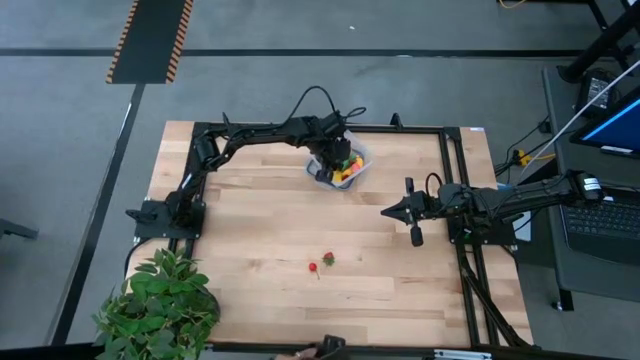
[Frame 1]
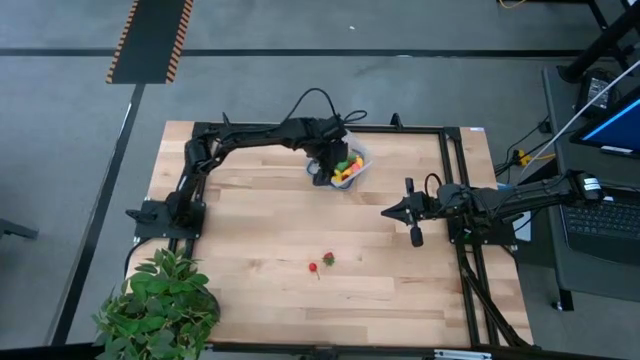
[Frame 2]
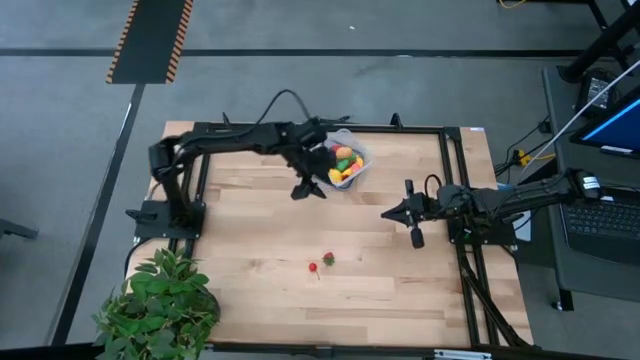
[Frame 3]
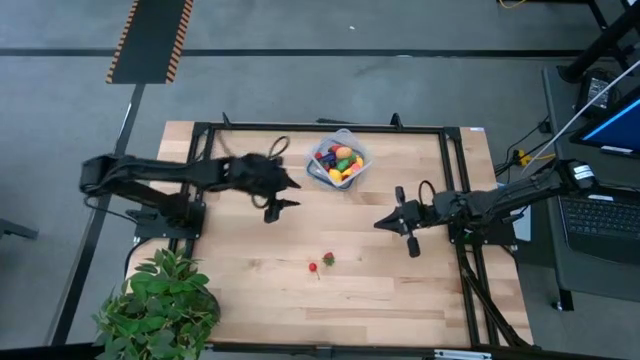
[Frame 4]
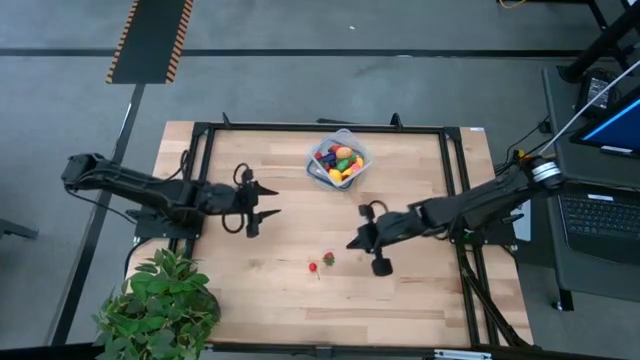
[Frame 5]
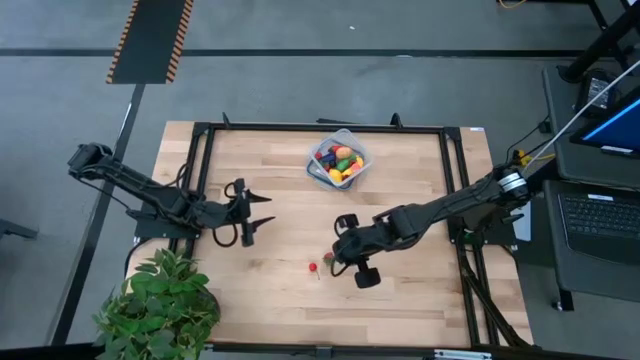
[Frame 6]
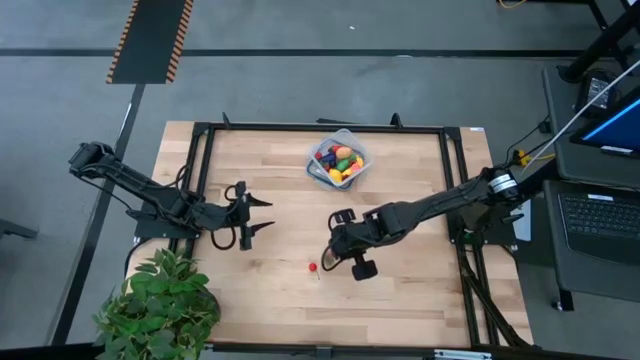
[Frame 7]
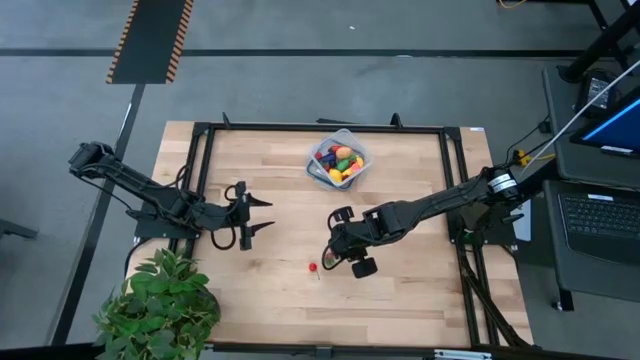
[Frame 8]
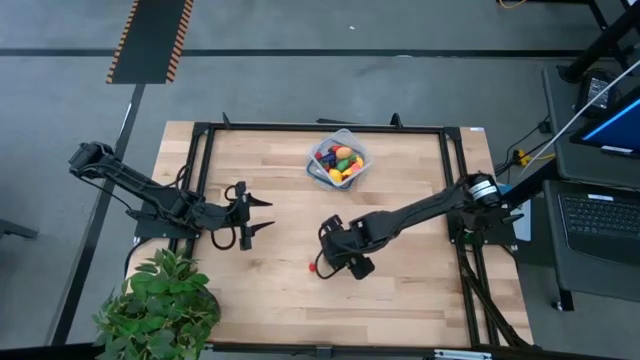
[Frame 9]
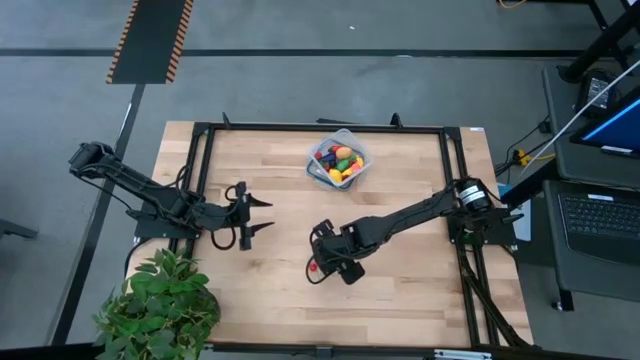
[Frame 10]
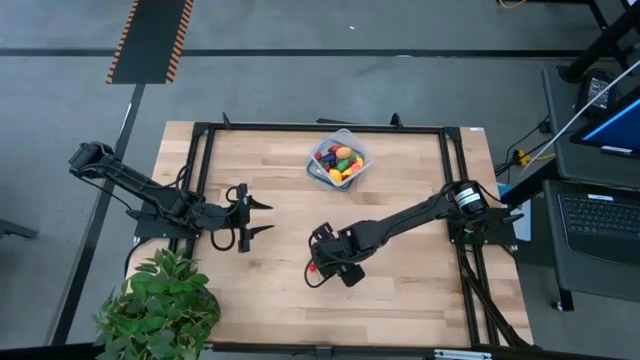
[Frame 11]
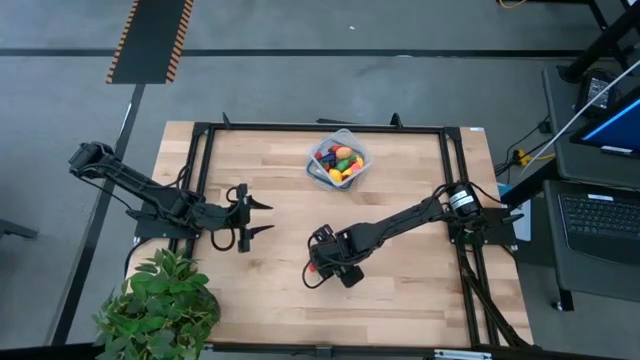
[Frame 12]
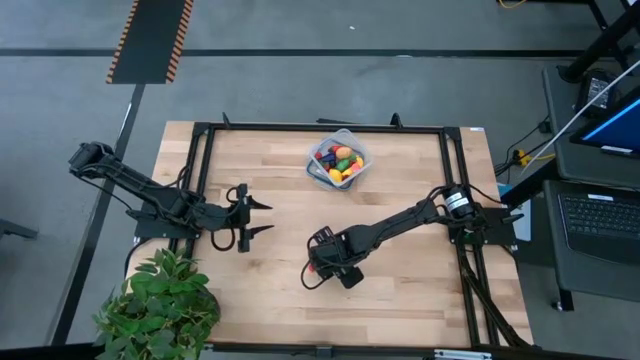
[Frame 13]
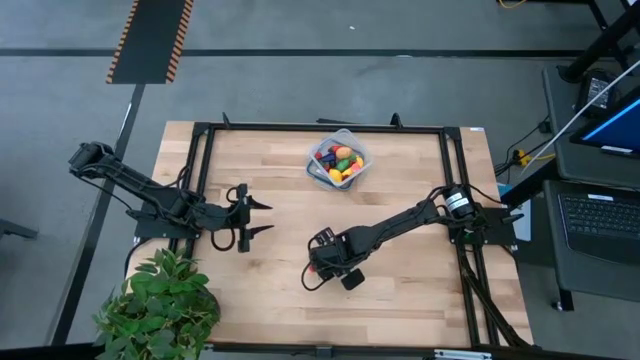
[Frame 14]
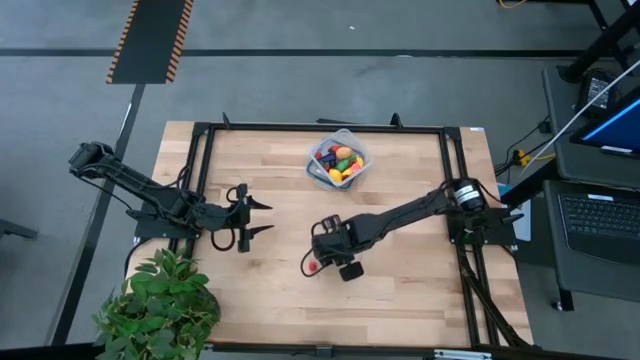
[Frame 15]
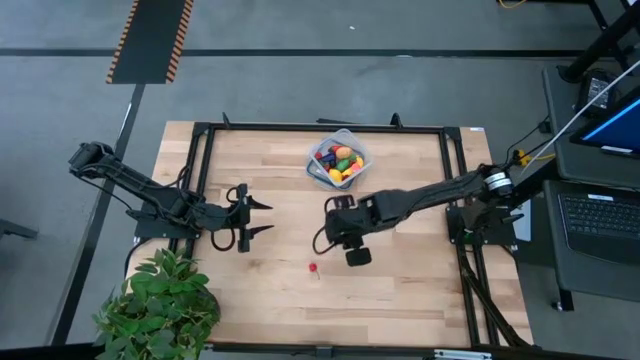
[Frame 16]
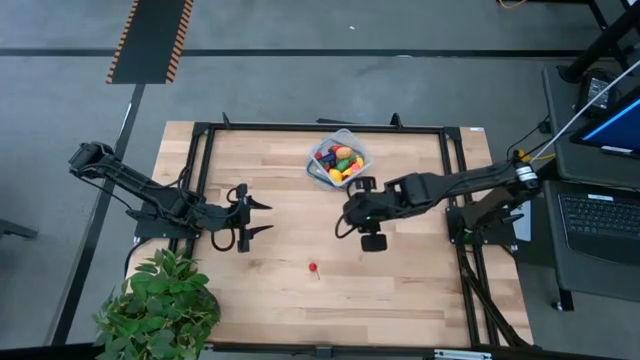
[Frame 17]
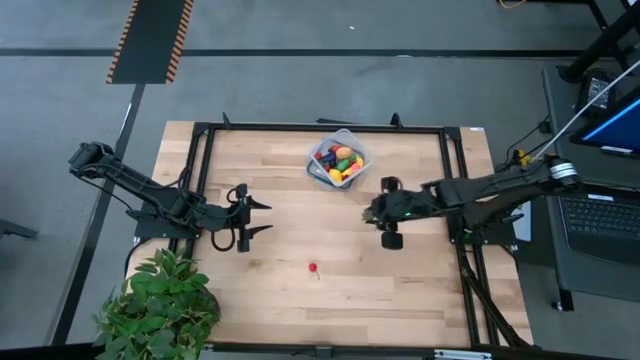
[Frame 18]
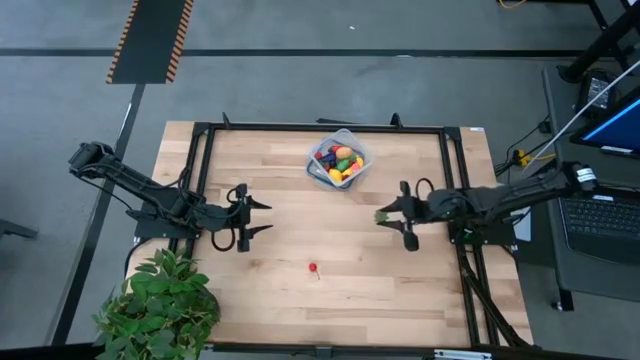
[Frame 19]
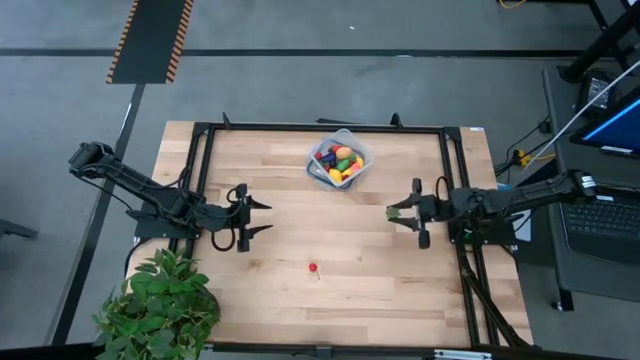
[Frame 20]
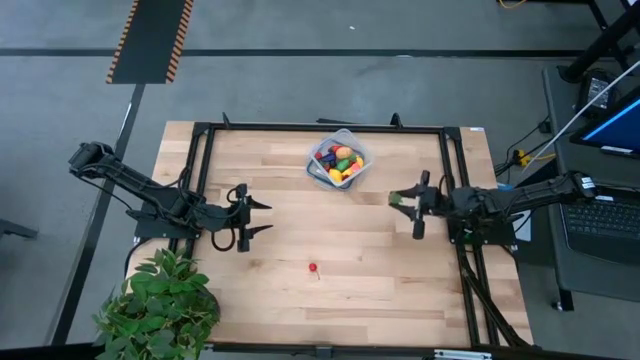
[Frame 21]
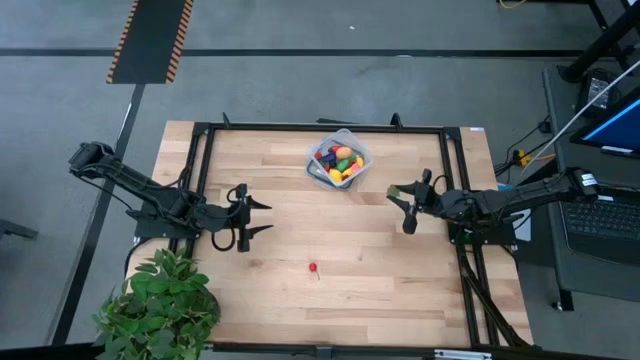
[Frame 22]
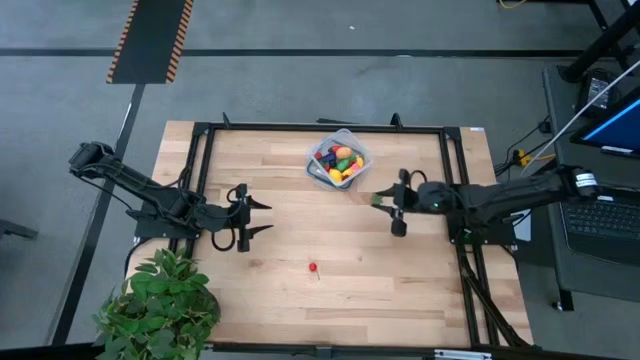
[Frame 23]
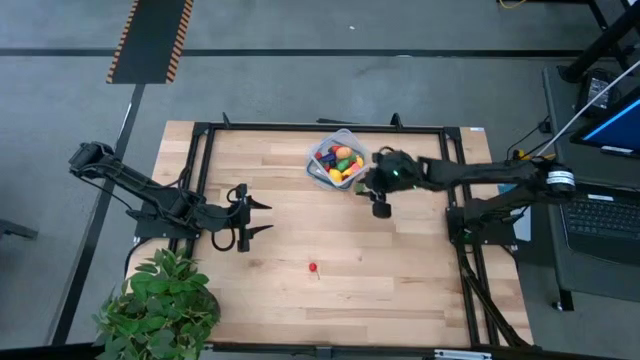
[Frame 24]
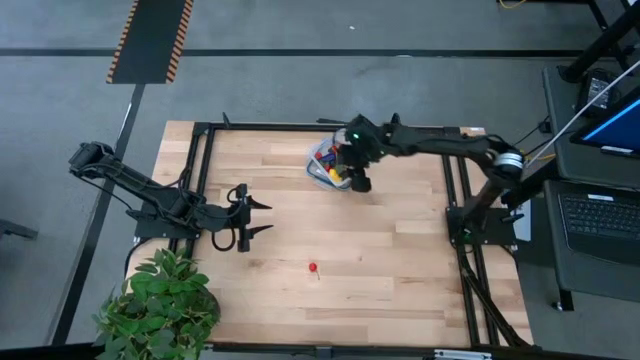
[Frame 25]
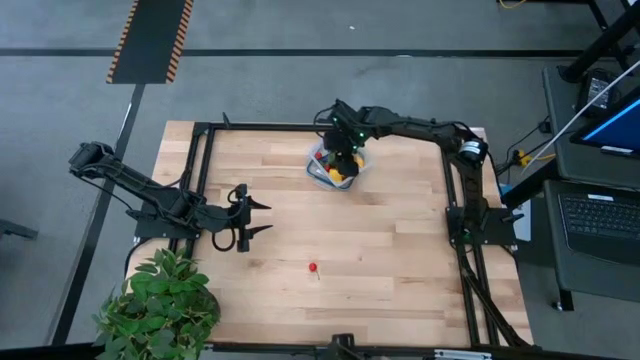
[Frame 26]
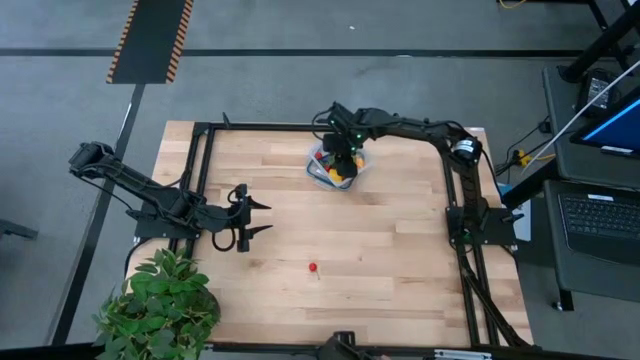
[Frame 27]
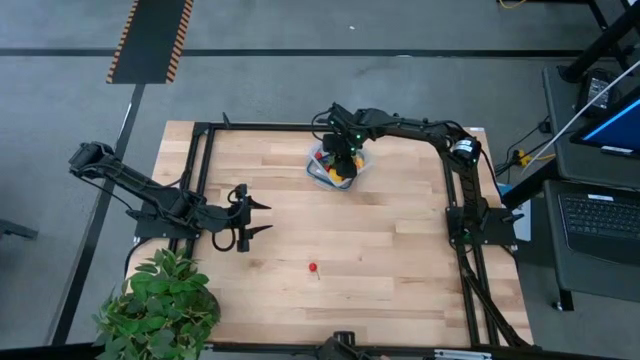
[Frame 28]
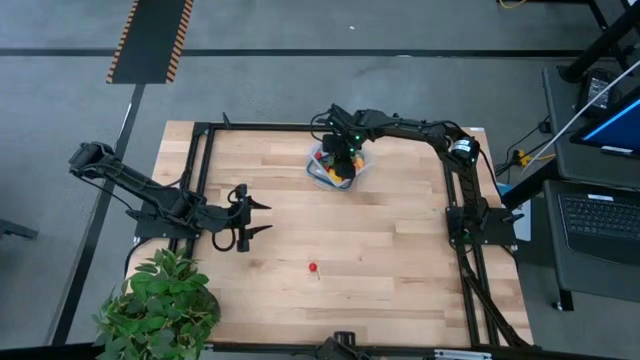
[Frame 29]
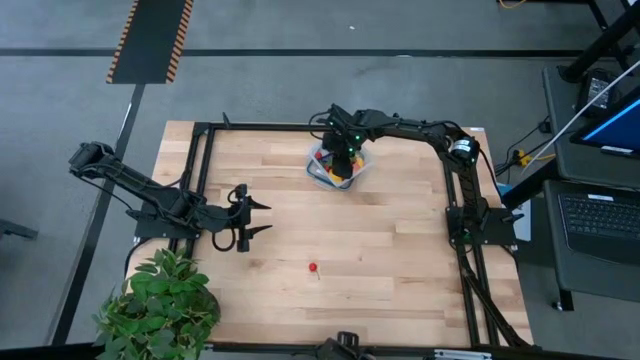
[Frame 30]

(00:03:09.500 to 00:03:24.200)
Task: Pick and placing Produce into tupperware
Put the red strawberry into the transparent container

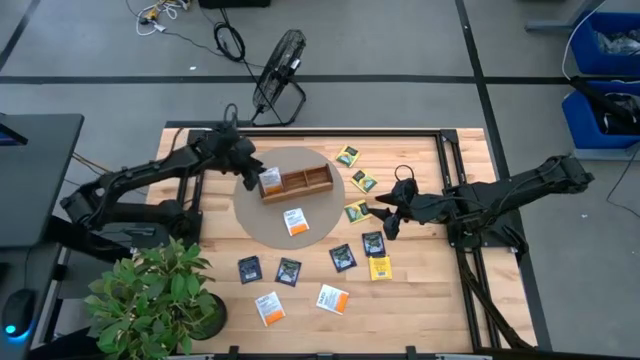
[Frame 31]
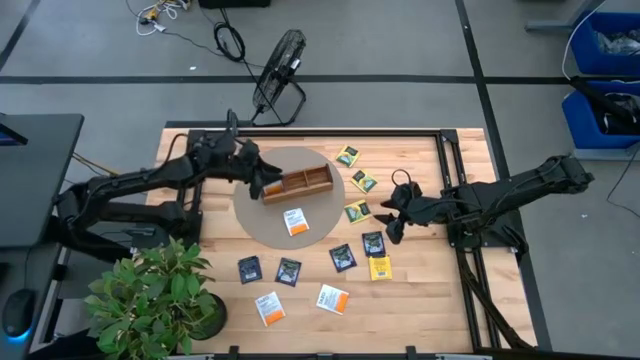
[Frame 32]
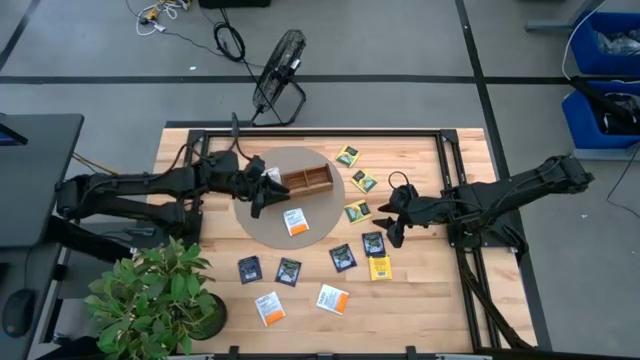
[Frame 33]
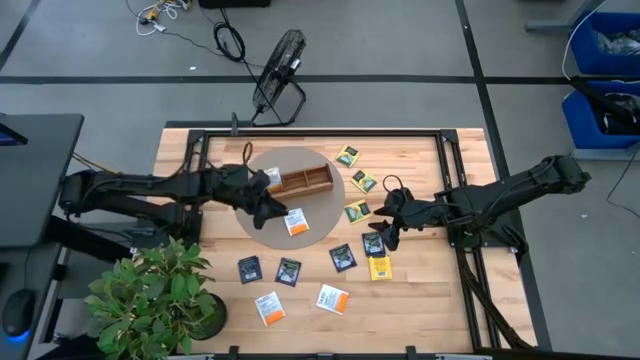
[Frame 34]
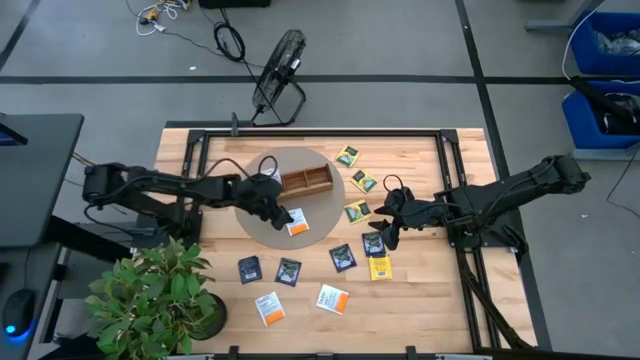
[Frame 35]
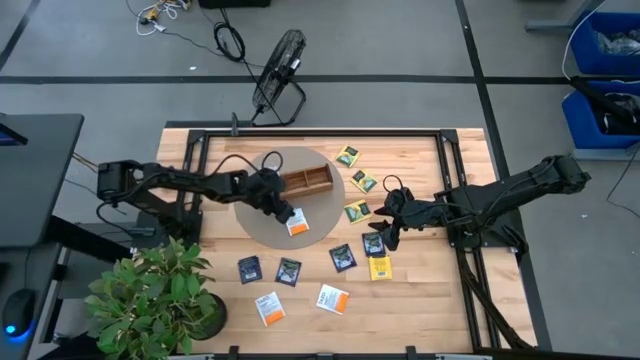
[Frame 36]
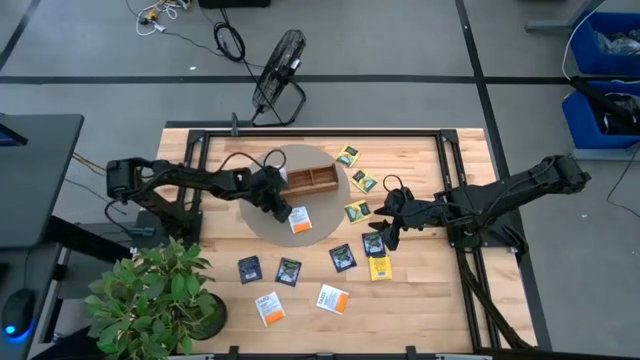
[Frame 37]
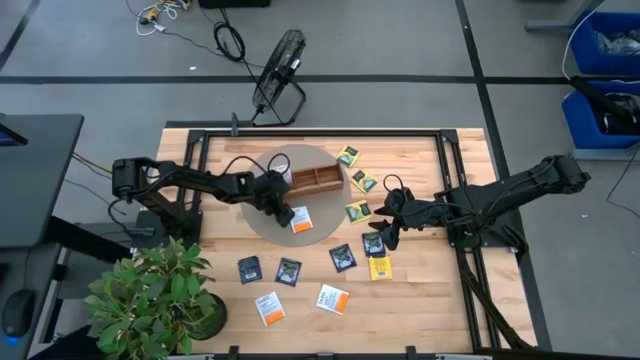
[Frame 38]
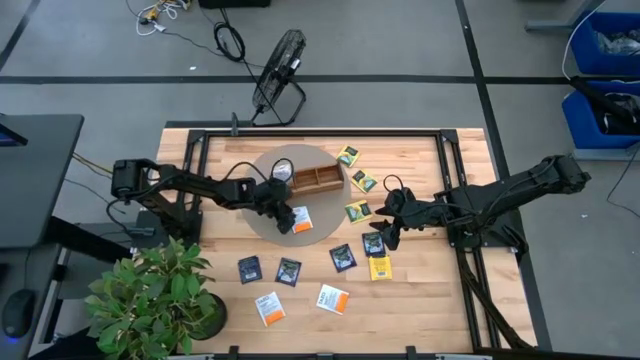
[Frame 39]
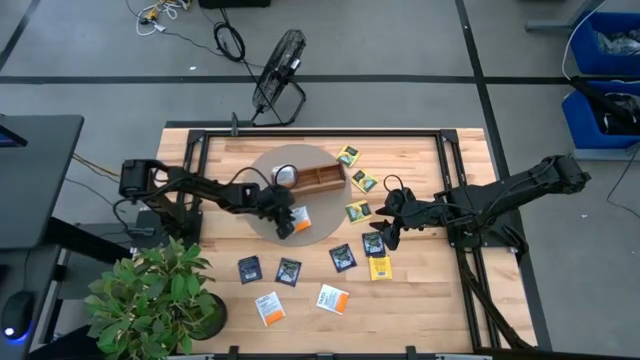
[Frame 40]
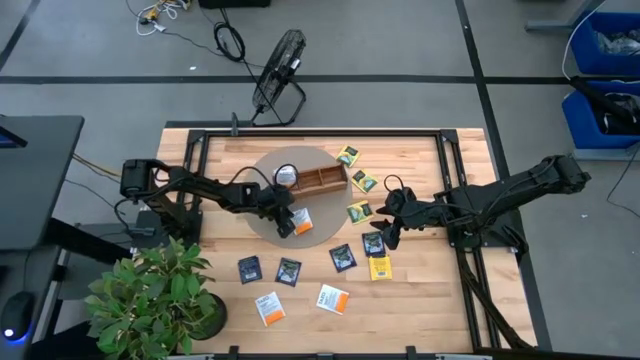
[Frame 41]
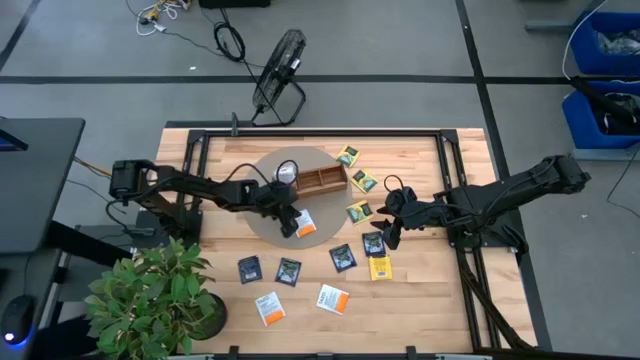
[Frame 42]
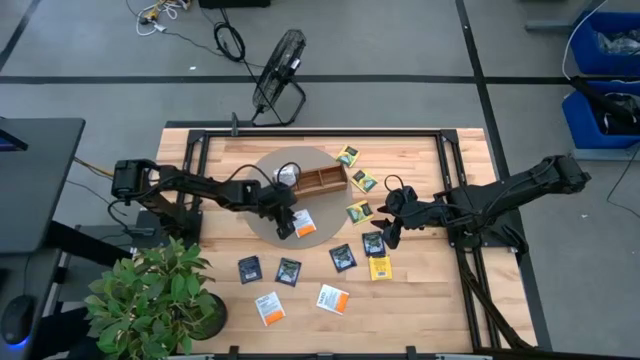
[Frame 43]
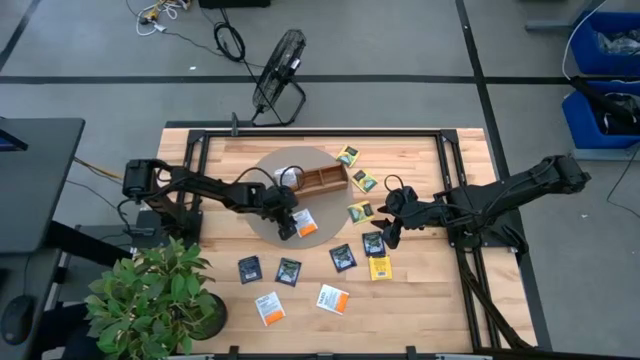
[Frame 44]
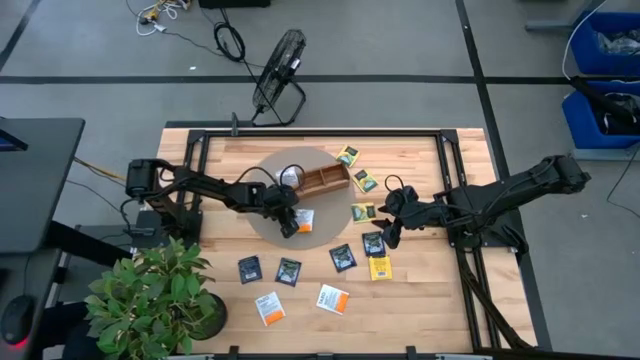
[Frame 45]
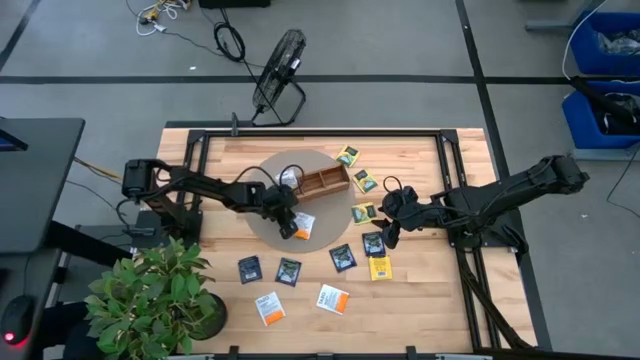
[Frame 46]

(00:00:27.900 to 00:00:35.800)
Task: Pick & Place Tea
Put the white tea bag into the left section of the wooden organizer
